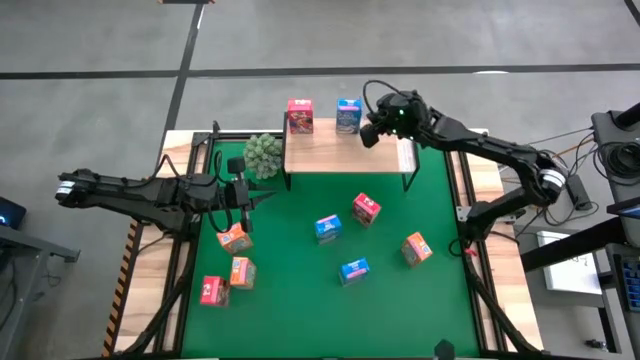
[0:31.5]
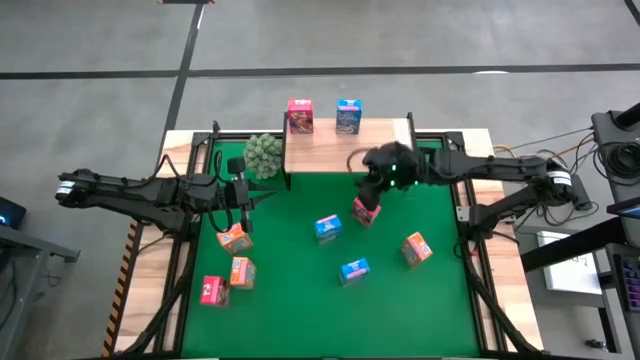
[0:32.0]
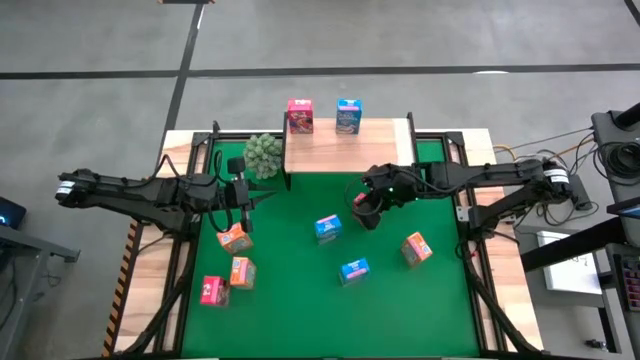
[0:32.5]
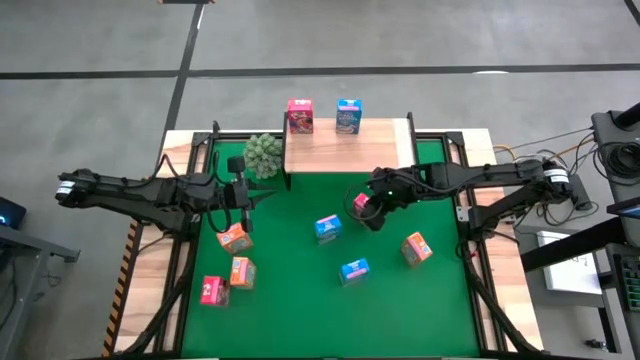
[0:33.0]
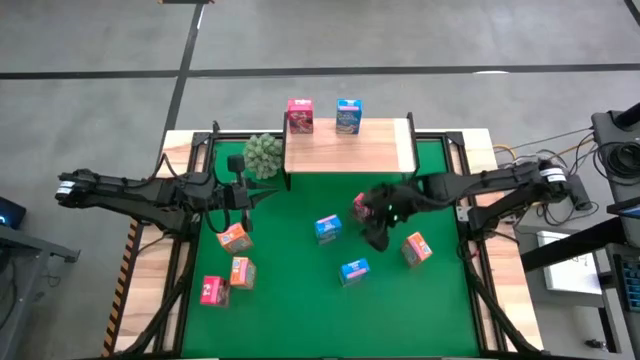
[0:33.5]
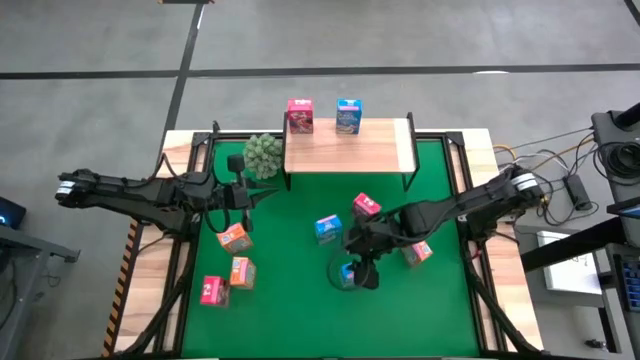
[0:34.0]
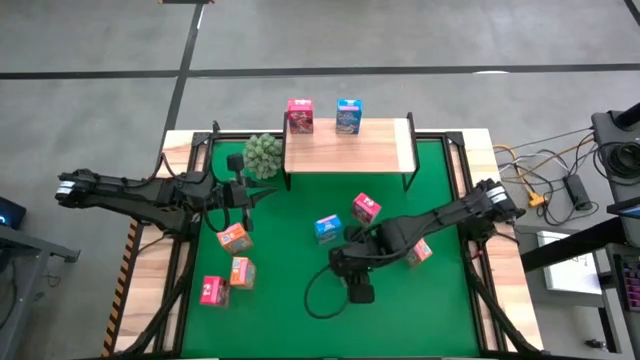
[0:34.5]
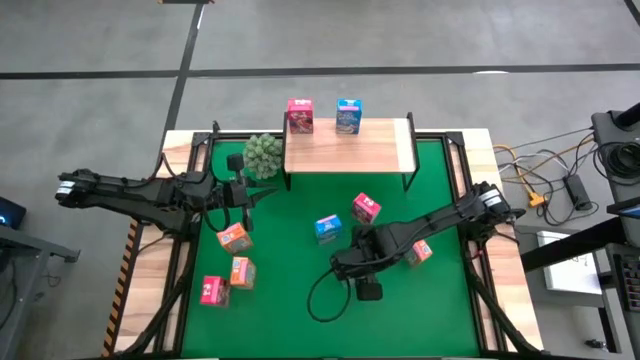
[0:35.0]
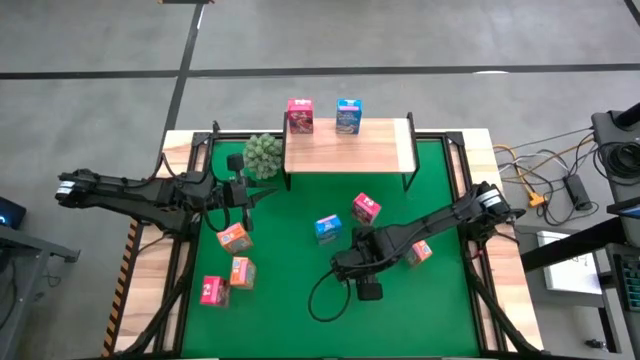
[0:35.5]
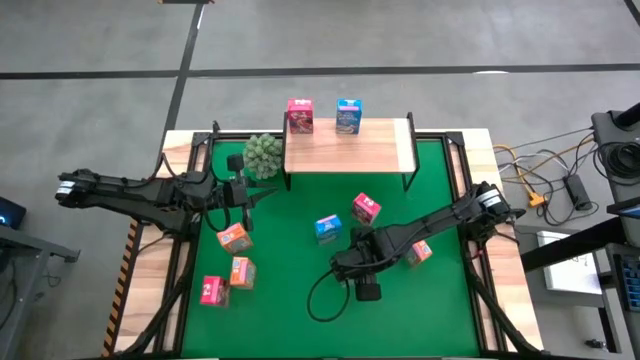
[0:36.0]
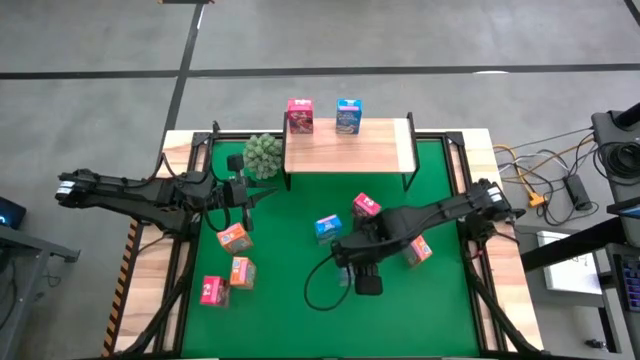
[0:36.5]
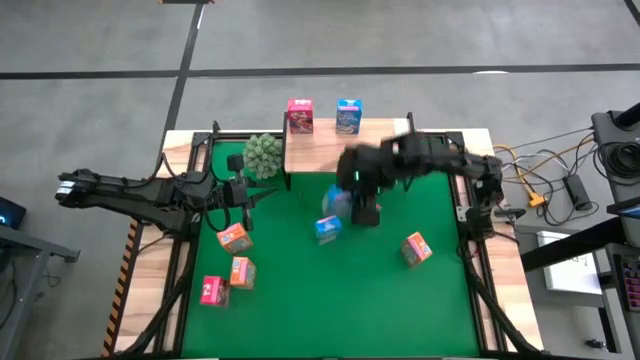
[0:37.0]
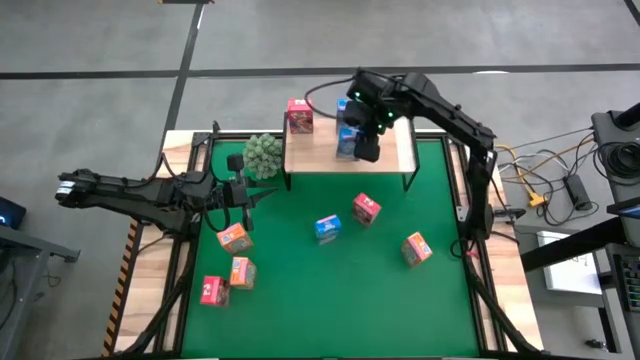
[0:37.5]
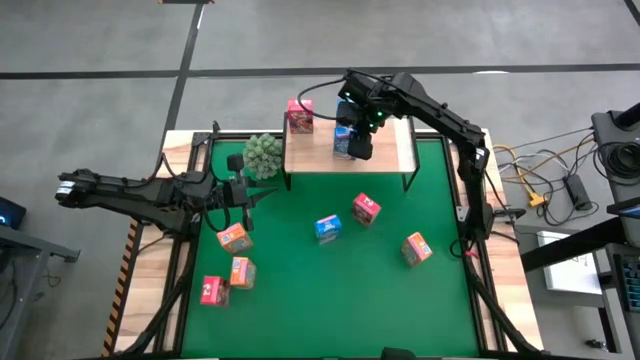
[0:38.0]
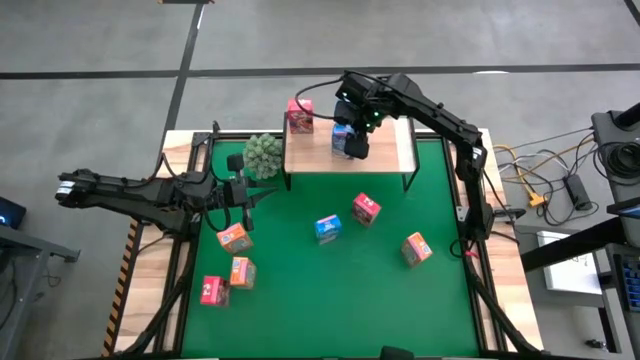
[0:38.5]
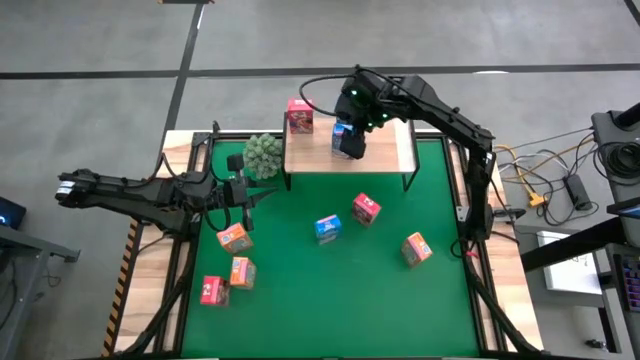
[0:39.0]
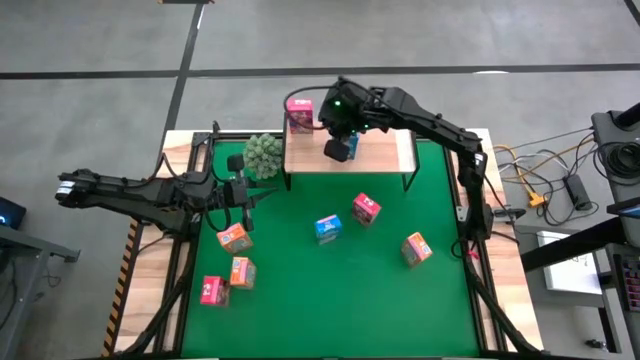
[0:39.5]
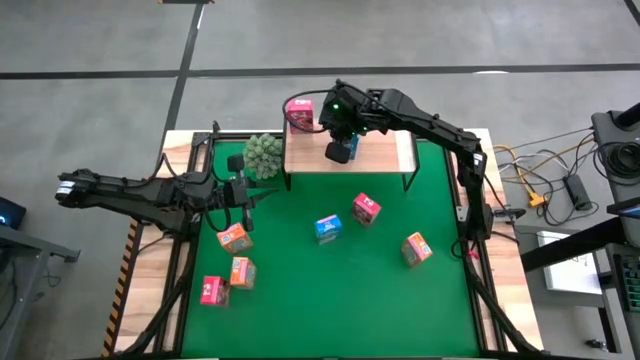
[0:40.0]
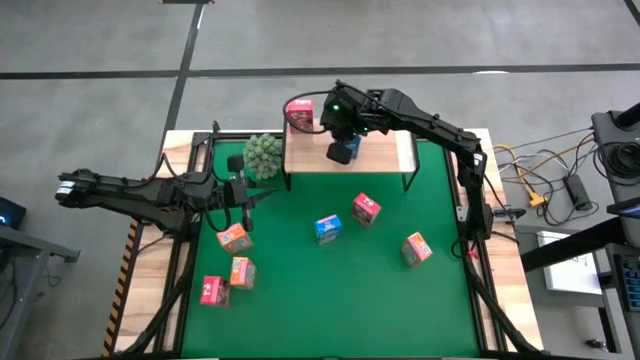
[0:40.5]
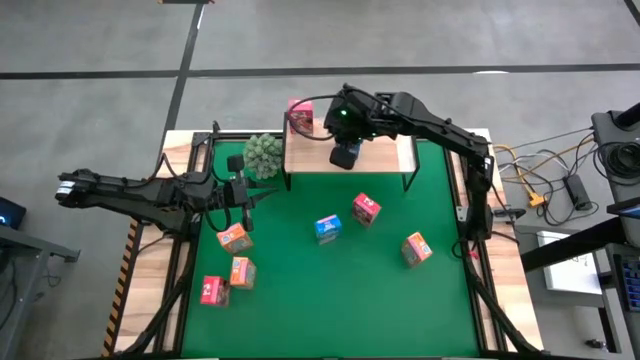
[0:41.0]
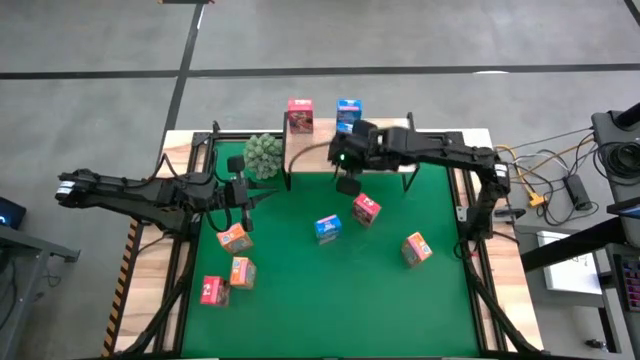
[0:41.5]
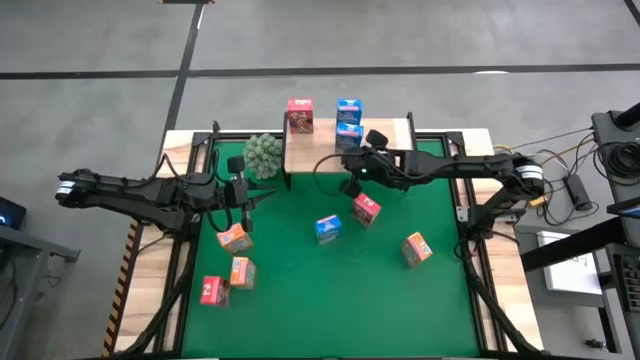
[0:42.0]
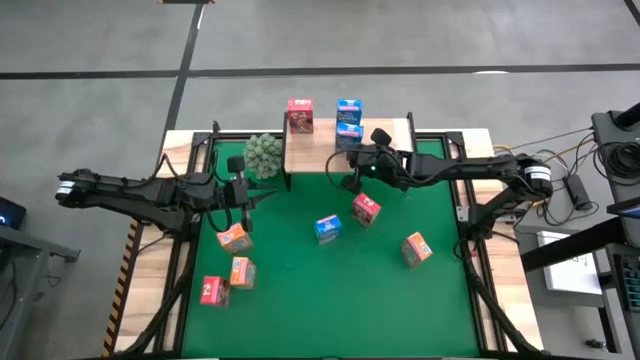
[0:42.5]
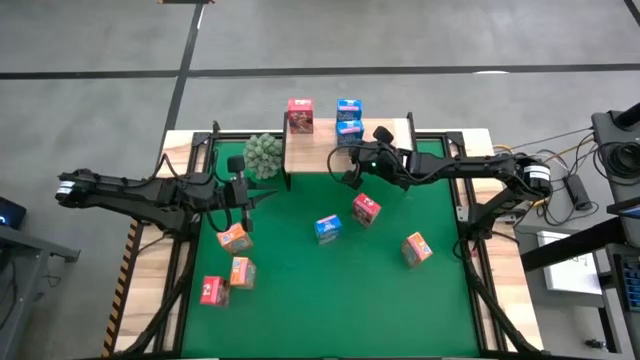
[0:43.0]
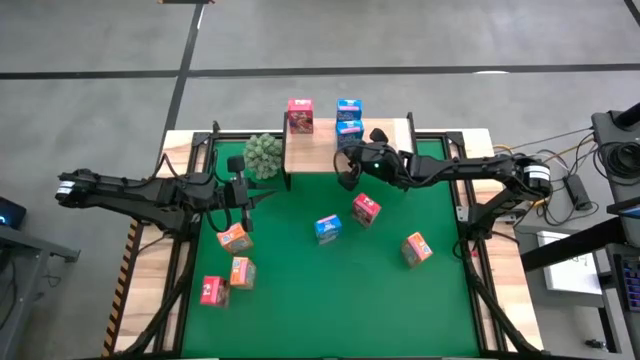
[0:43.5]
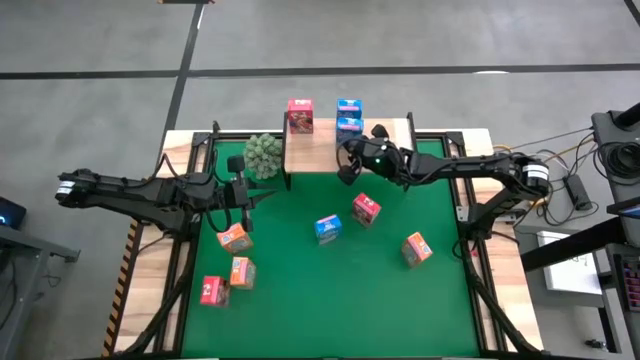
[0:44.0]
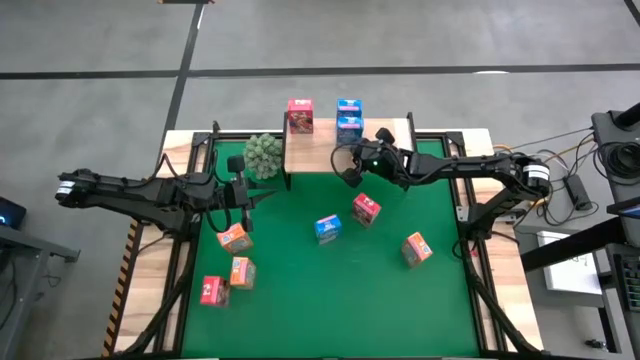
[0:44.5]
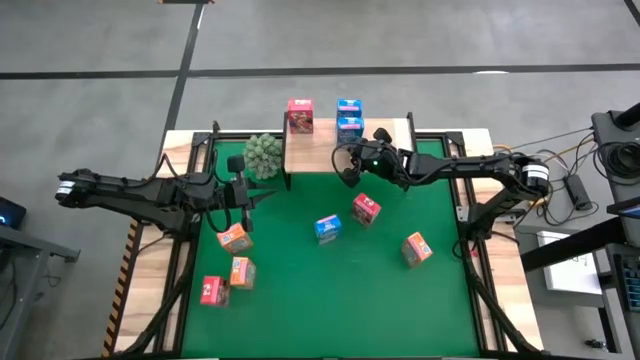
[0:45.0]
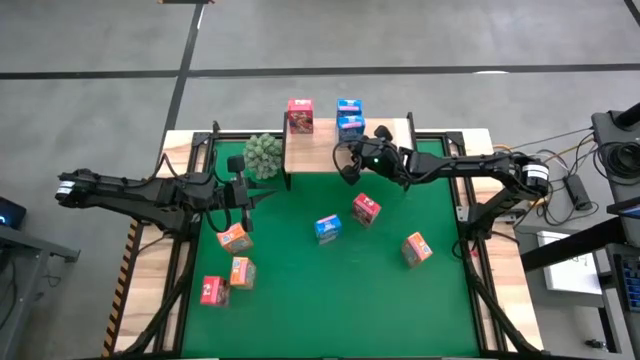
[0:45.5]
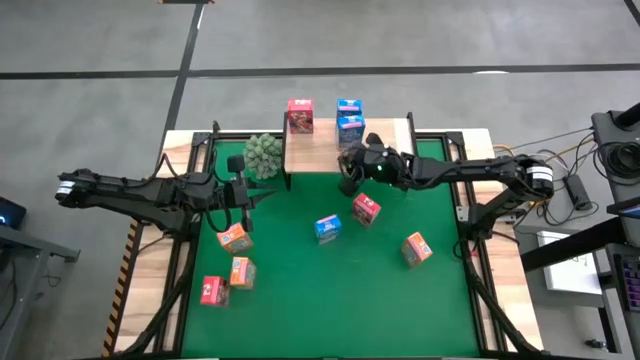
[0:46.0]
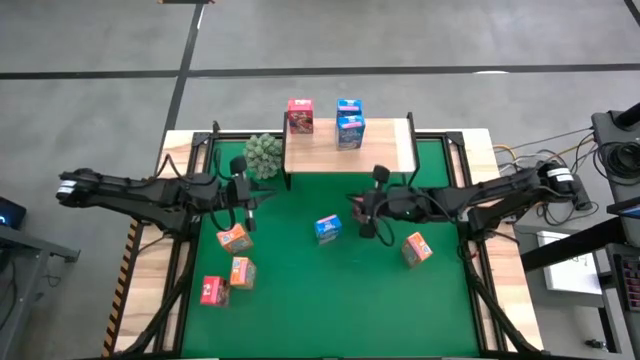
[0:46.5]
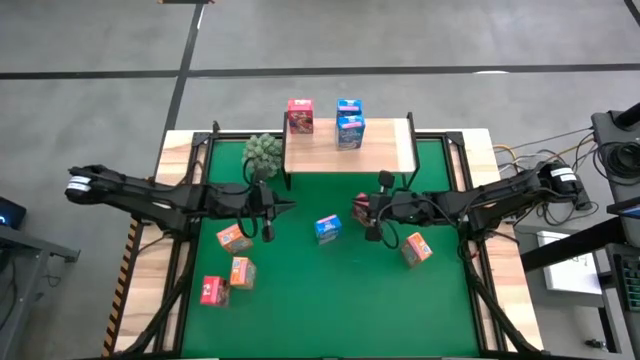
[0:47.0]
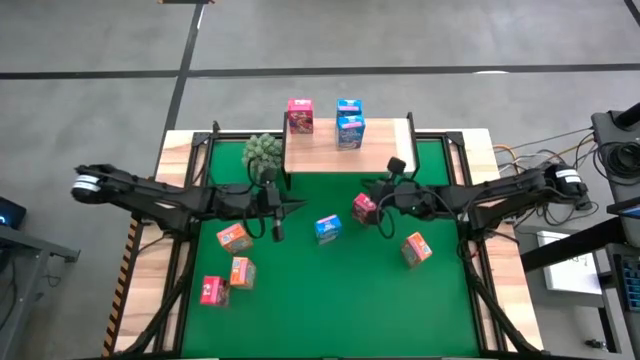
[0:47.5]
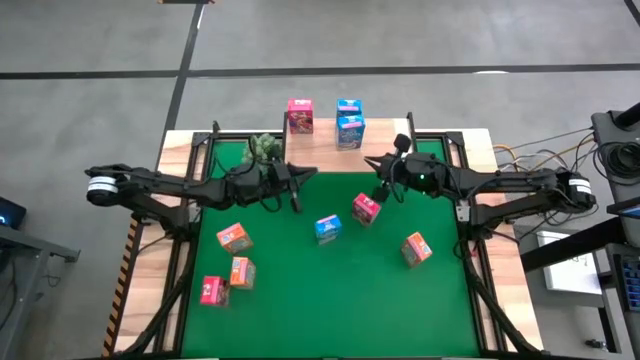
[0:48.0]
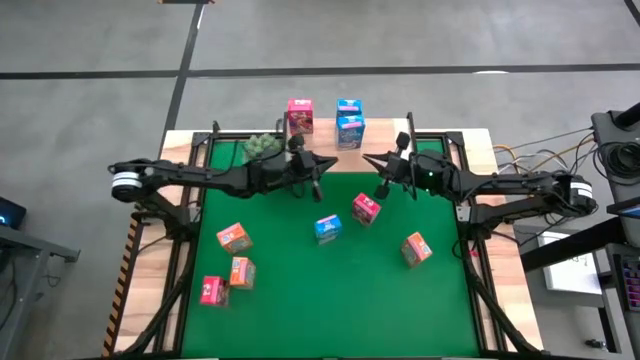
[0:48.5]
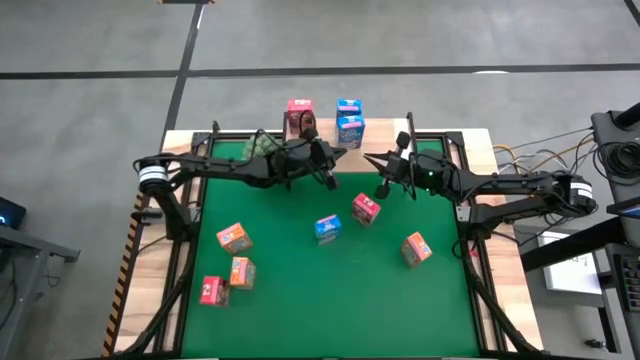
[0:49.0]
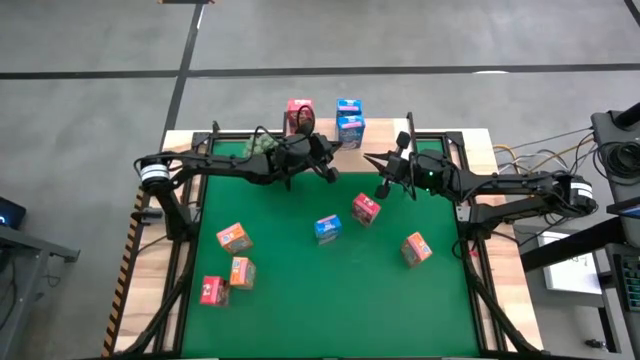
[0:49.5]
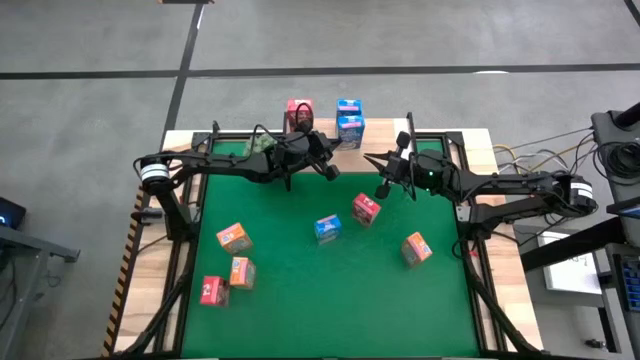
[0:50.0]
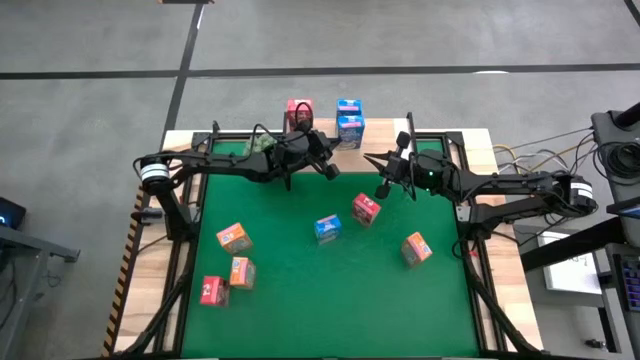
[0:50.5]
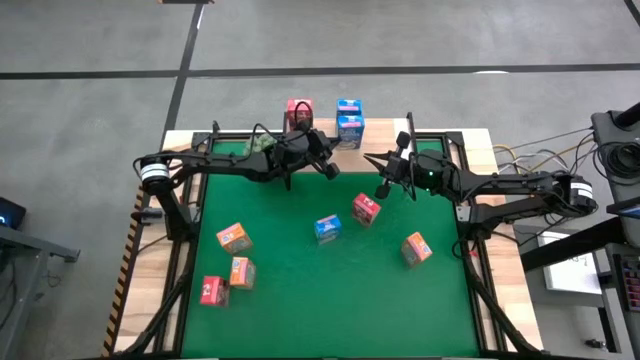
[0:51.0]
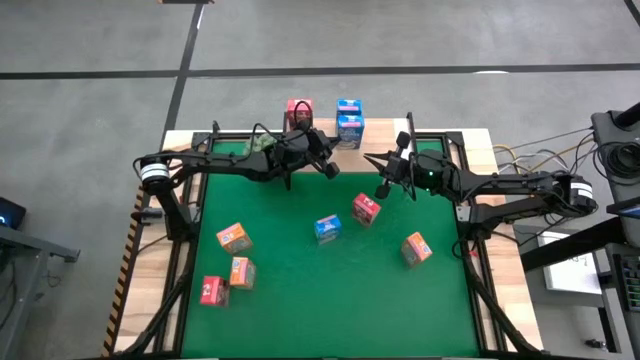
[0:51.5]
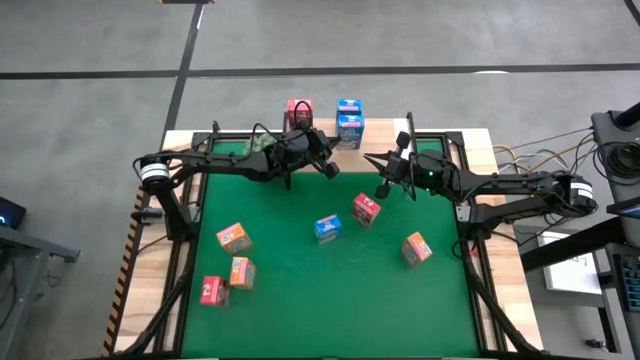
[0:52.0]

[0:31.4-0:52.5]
Task: Stack cereal on shelf
Put the bottom blue cereal box on the shelf aligned with the other blue cereal box
